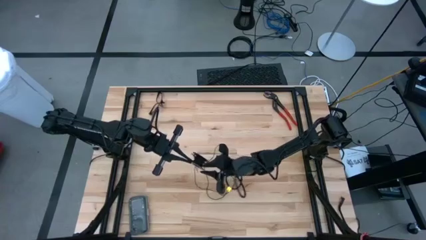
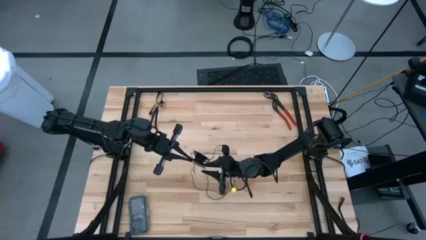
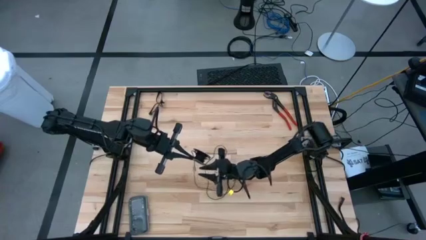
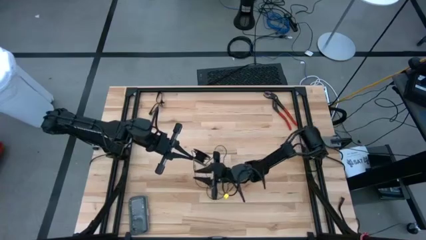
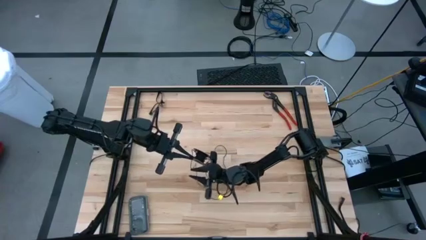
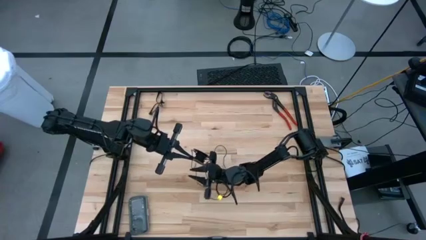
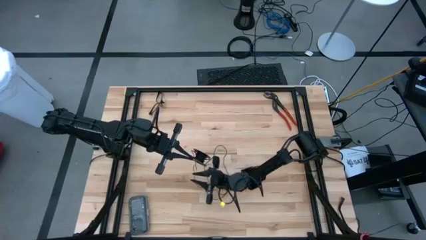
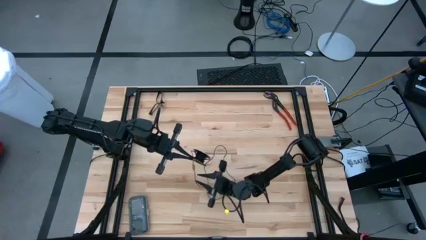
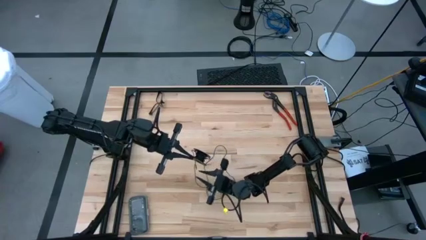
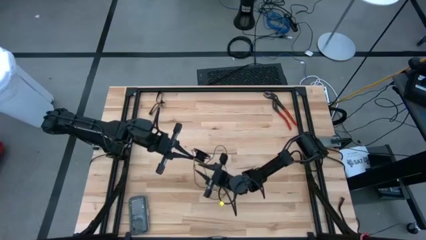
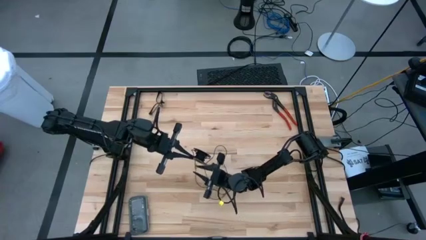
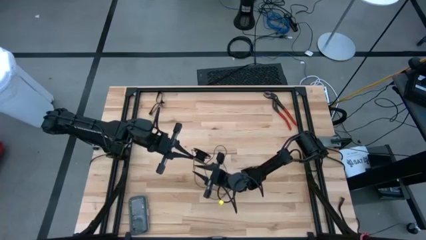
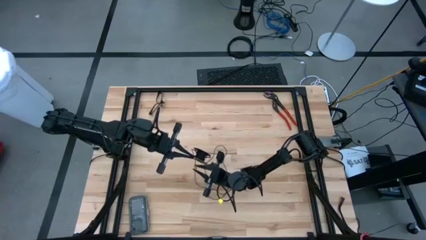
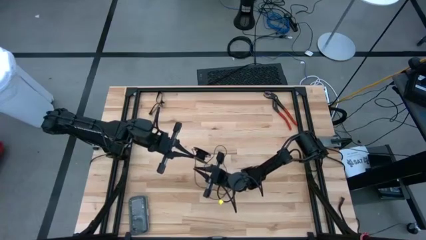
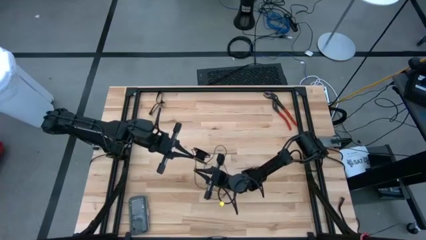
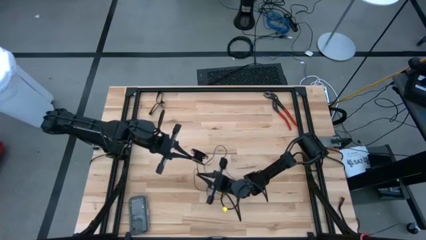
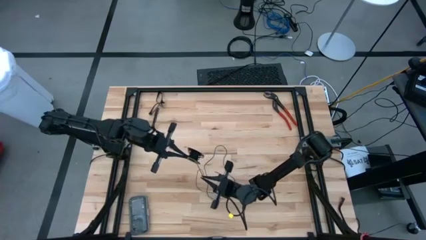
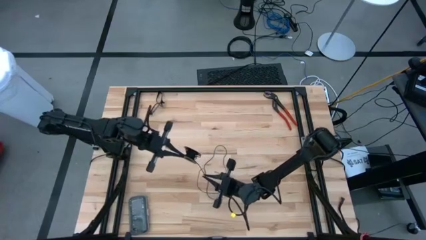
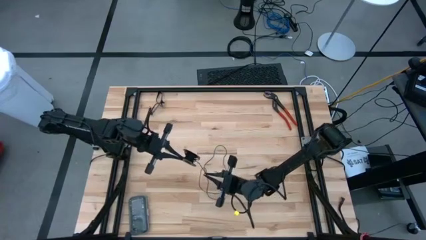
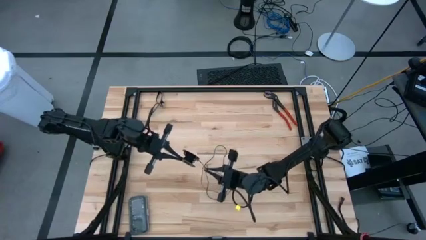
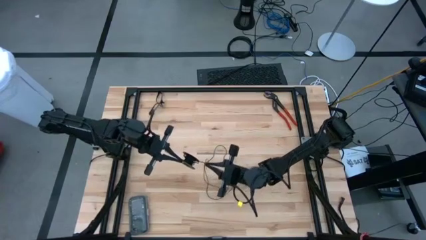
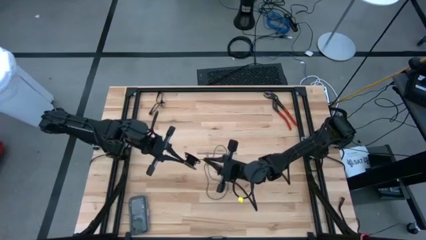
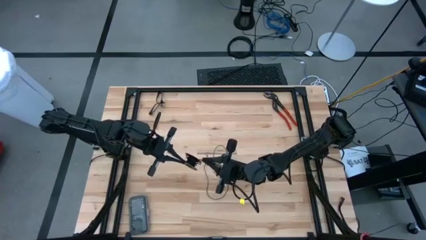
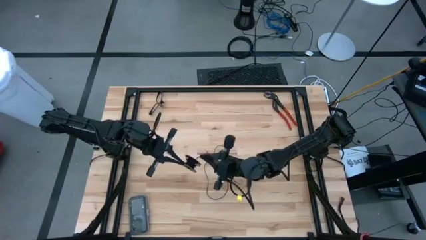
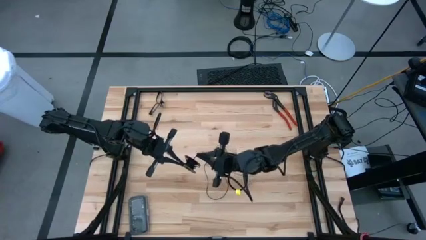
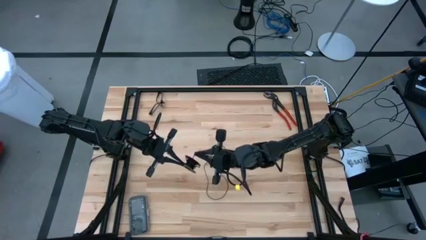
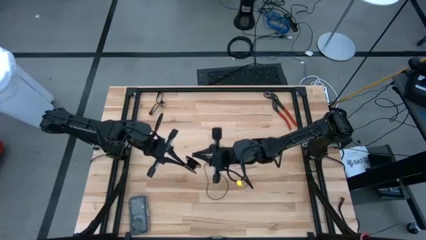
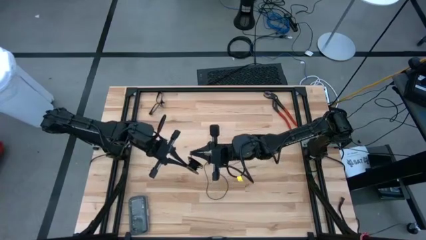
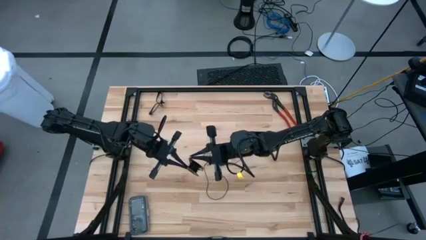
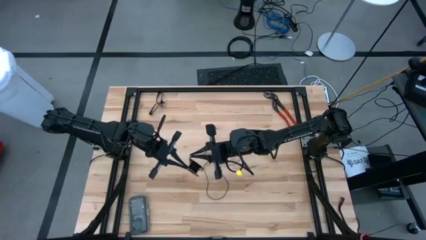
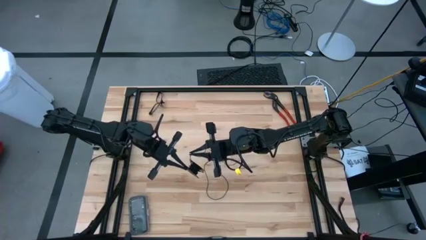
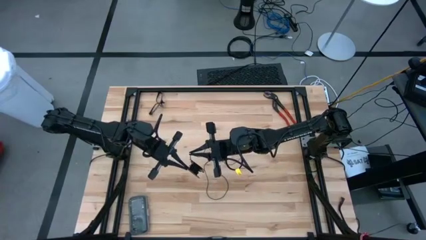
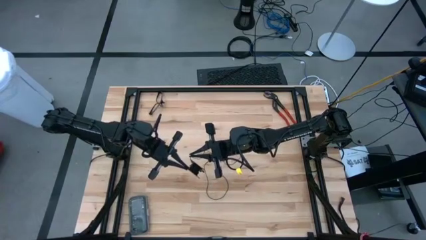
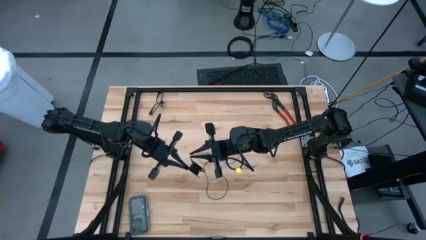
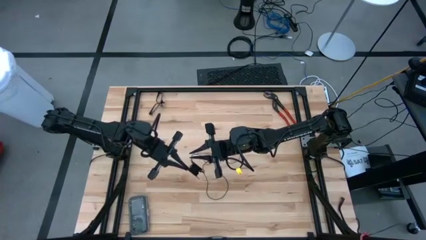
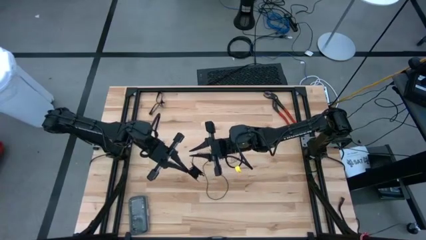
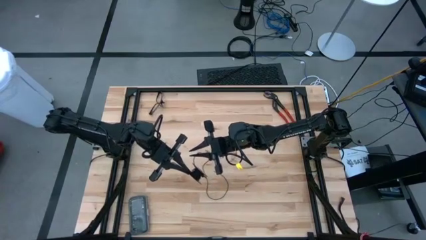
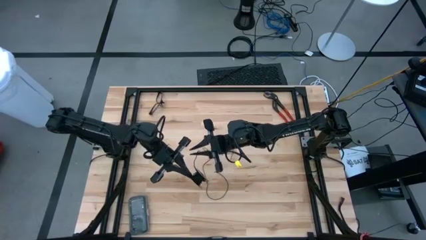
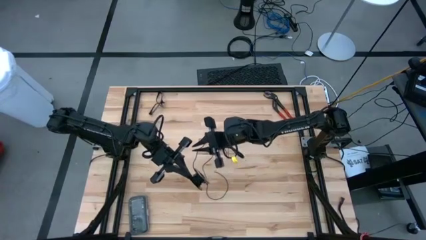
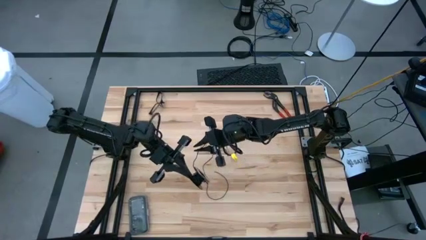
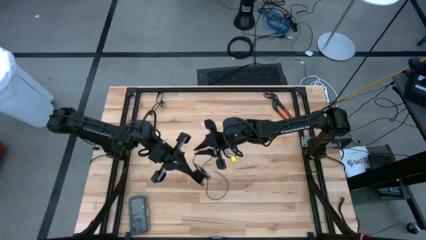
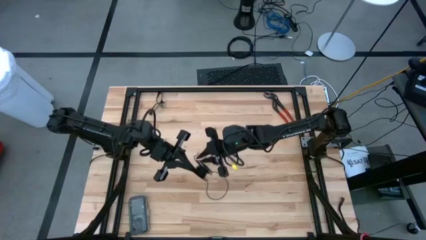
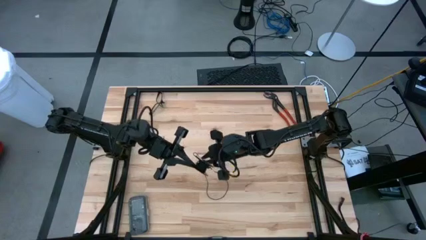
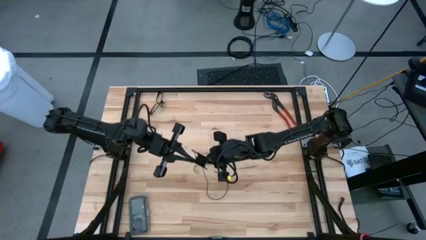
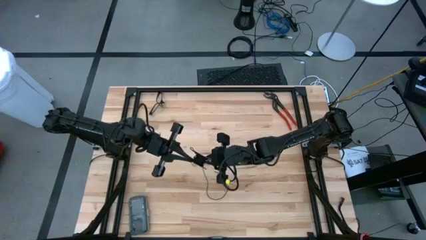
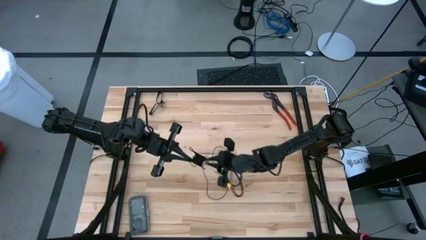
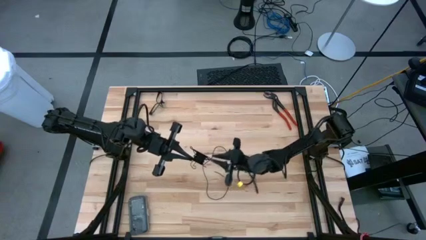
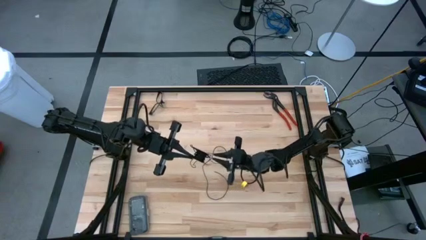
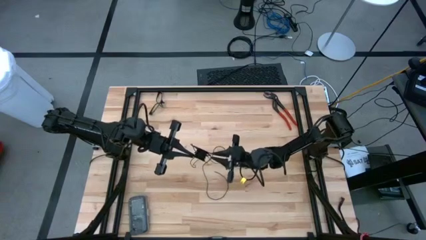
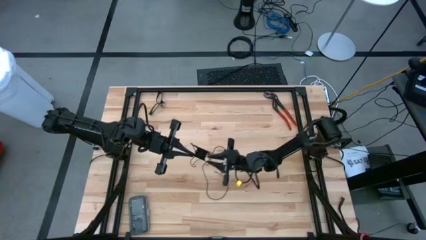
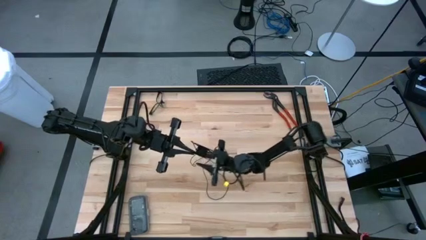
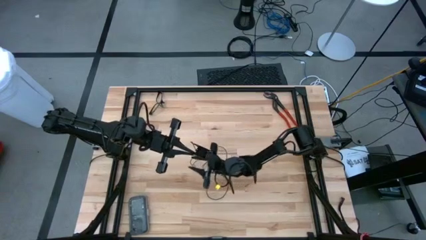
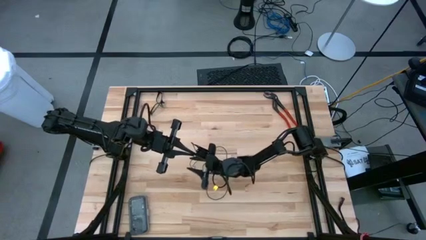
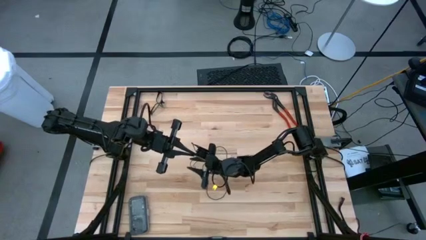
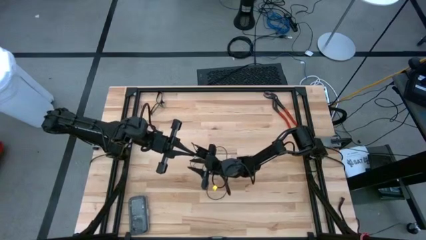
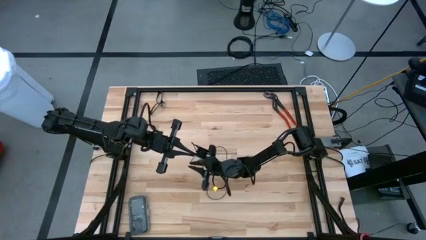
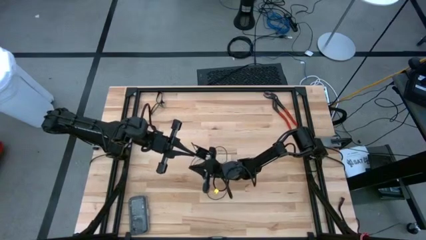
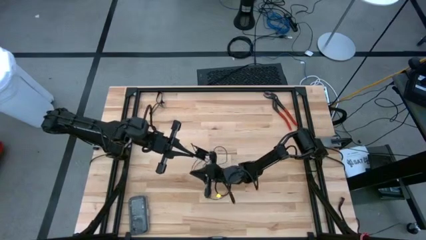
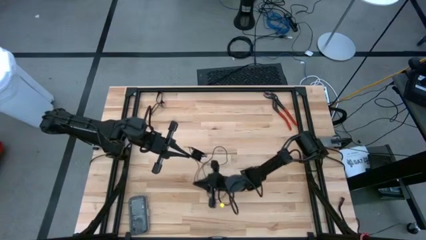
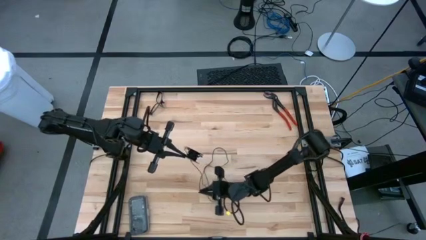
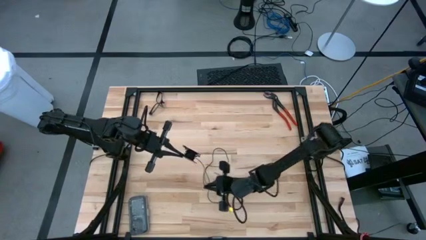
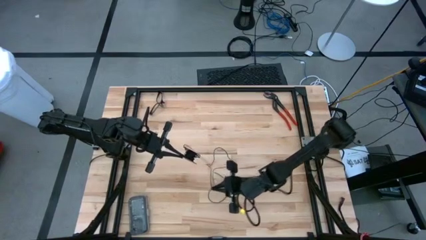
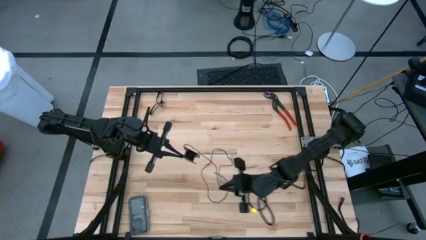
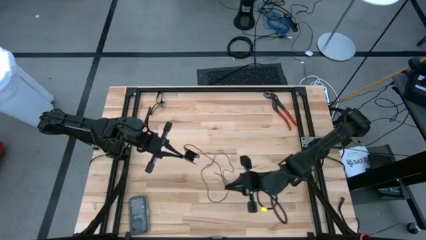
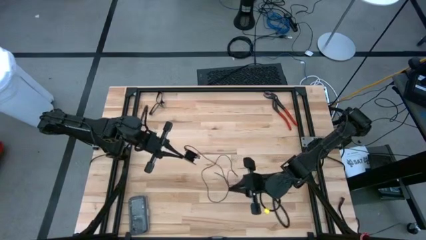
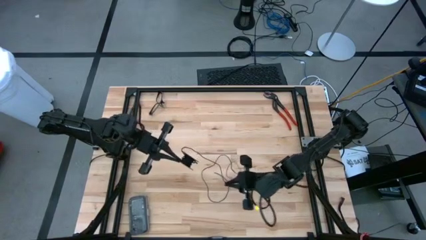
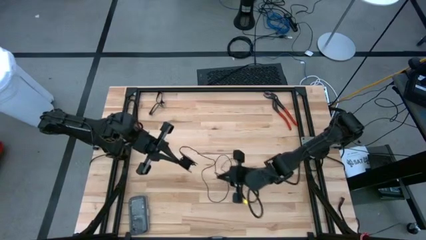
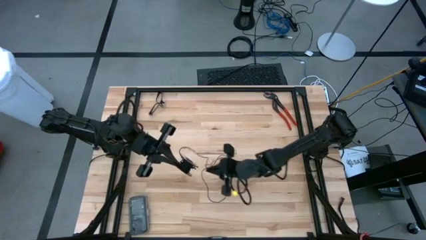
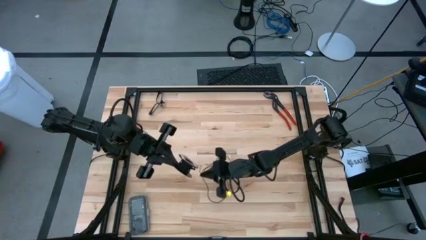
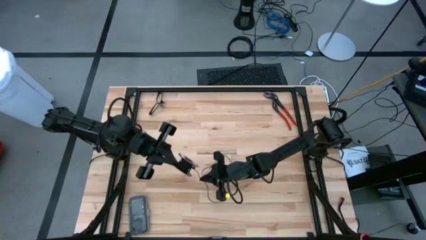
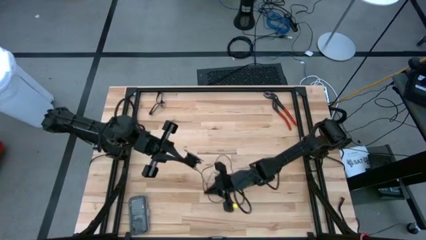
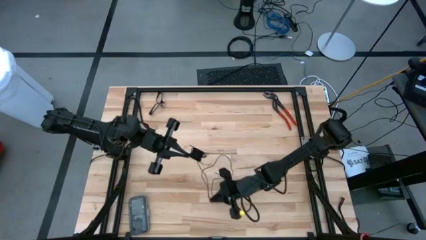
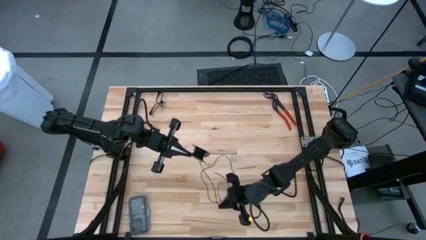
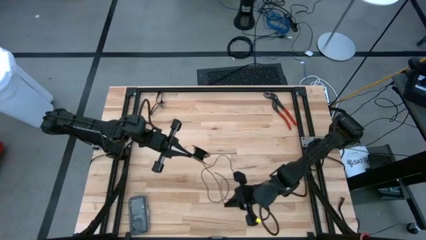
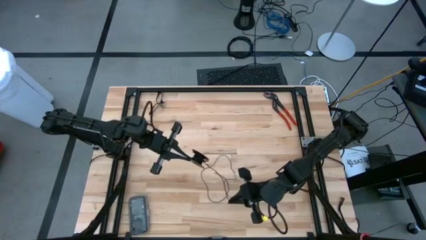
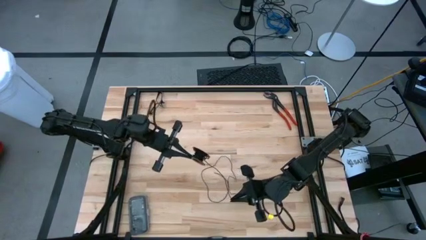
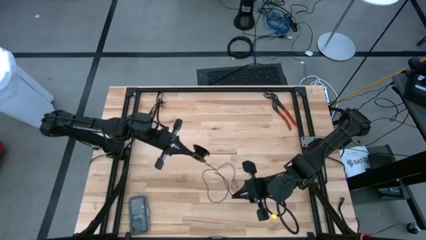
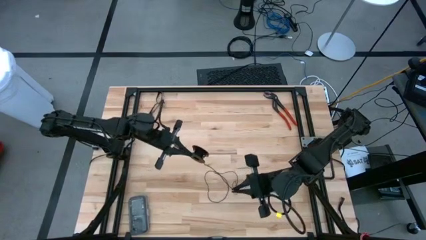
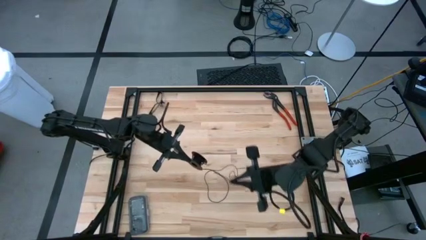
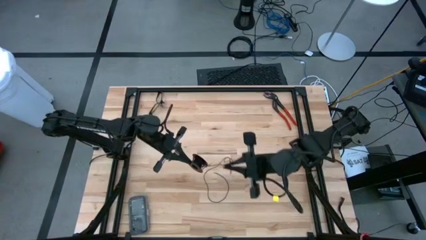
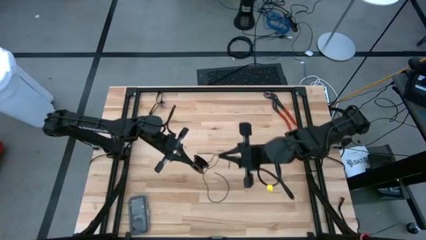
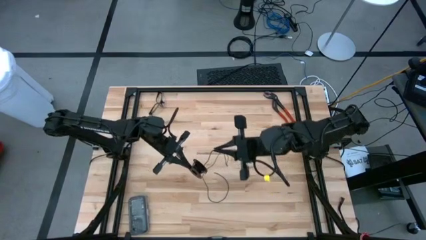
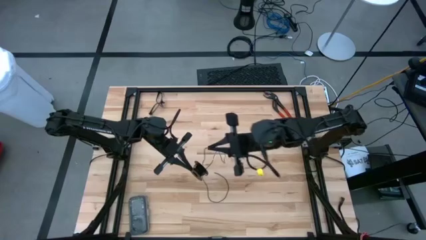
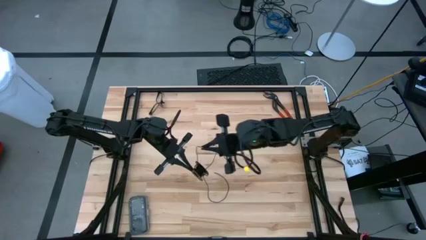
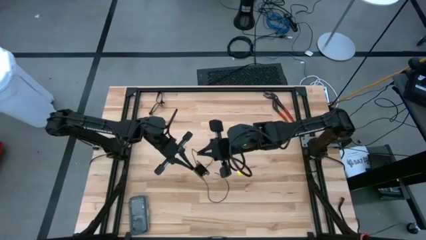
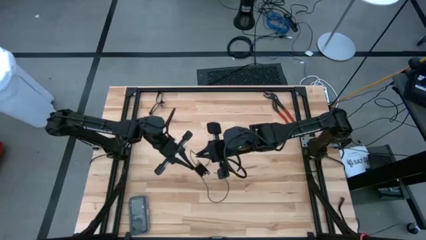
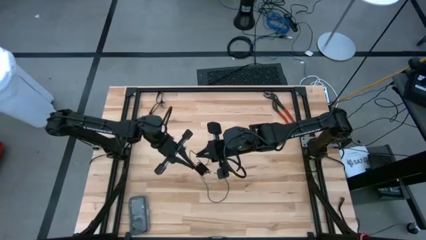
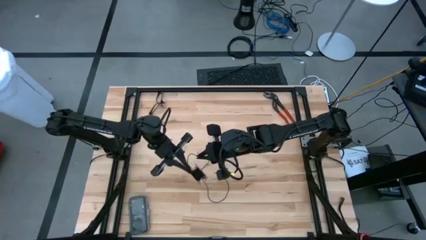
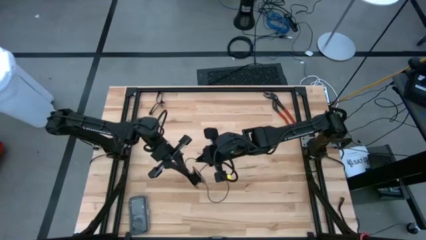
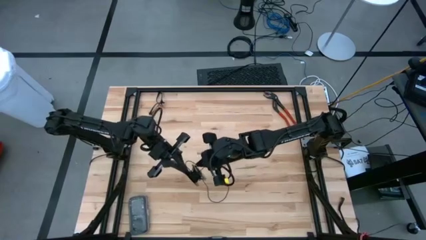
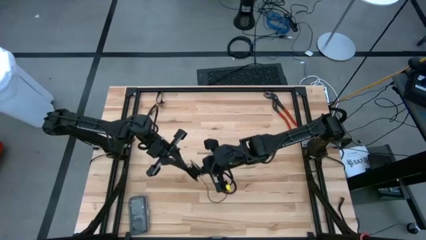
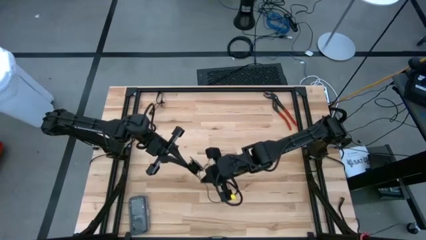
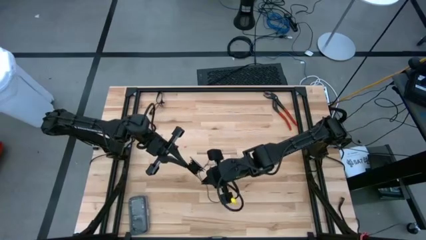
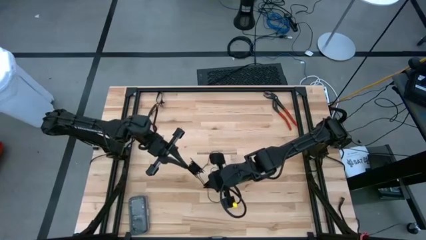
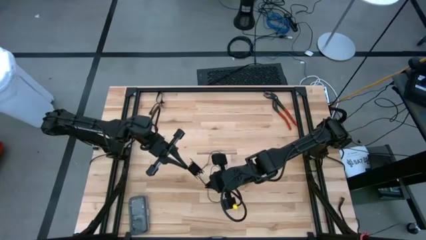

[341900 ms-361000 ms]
Task: Coil cords
Coil the black wire onto the spool
